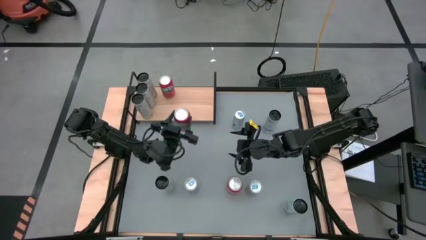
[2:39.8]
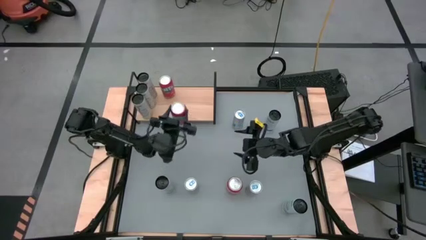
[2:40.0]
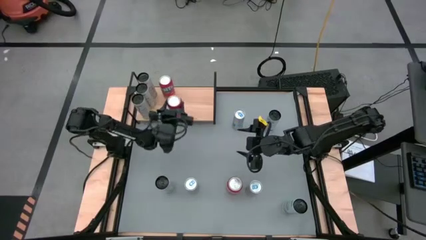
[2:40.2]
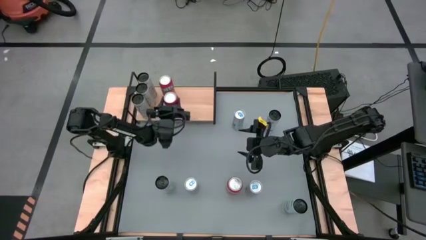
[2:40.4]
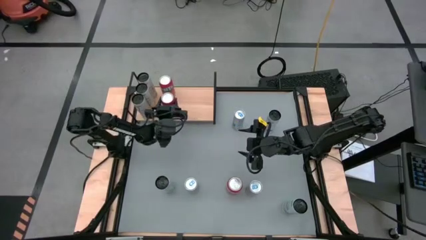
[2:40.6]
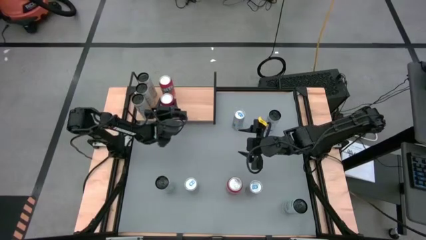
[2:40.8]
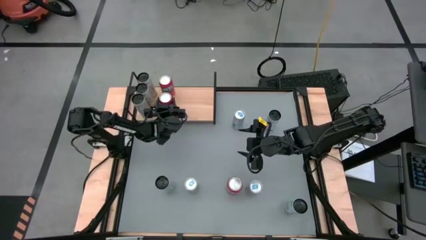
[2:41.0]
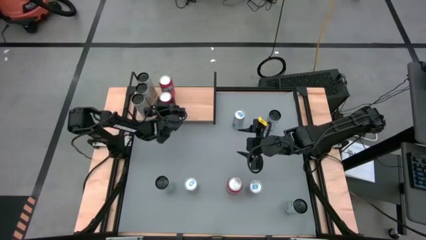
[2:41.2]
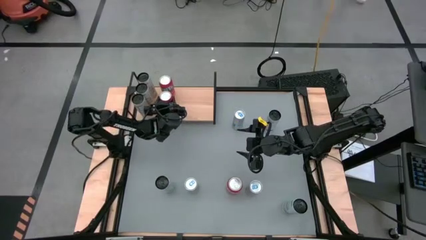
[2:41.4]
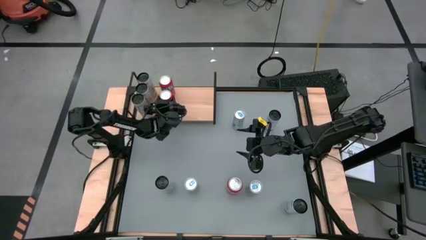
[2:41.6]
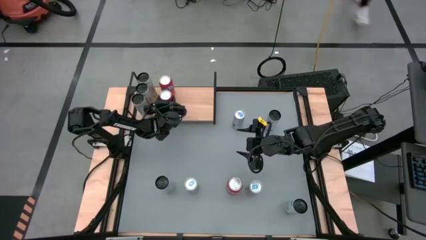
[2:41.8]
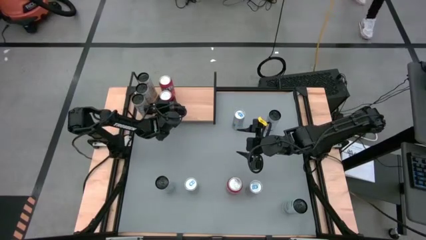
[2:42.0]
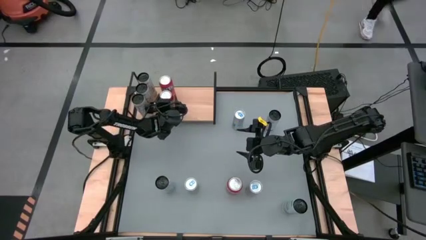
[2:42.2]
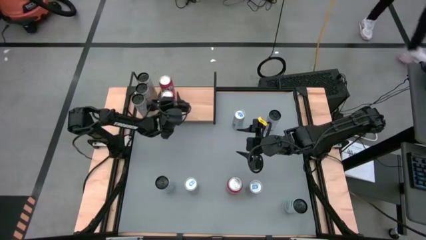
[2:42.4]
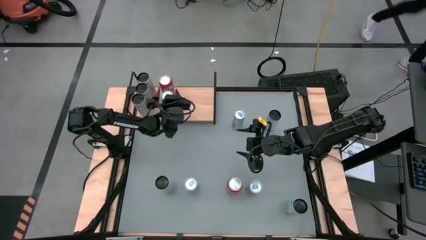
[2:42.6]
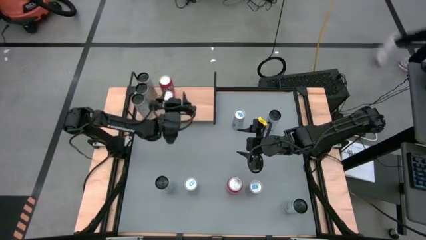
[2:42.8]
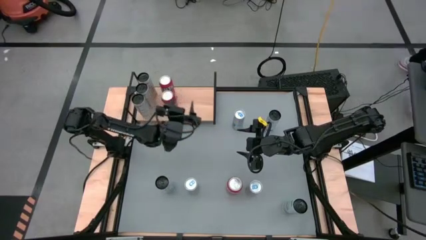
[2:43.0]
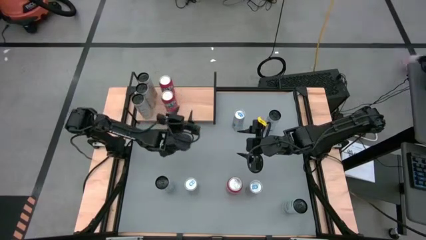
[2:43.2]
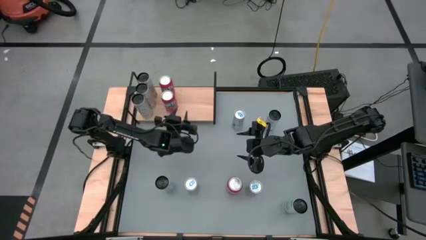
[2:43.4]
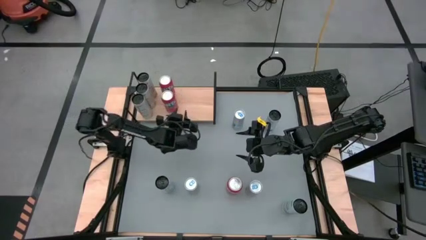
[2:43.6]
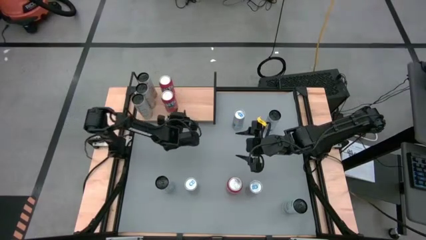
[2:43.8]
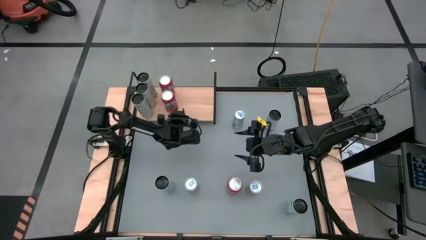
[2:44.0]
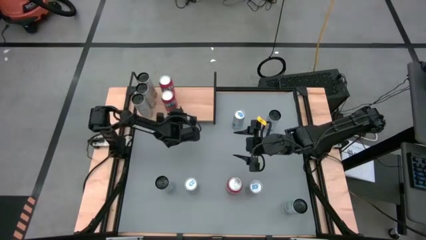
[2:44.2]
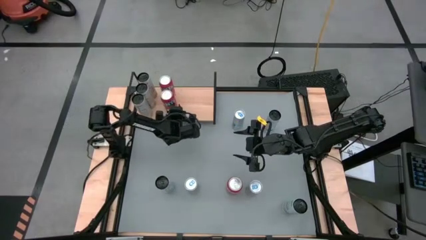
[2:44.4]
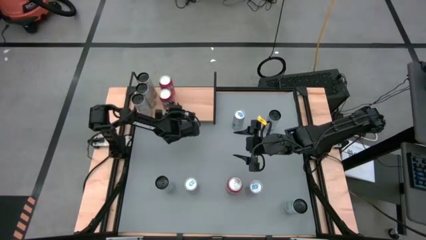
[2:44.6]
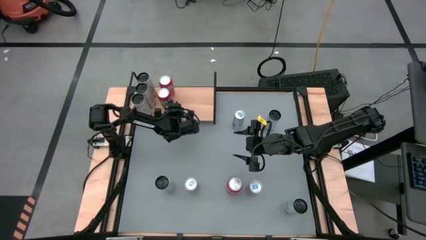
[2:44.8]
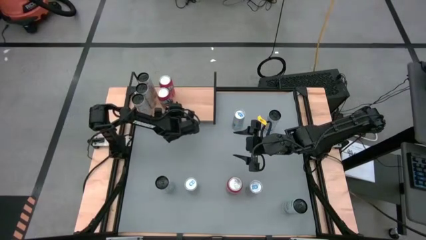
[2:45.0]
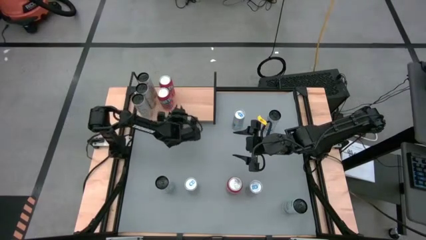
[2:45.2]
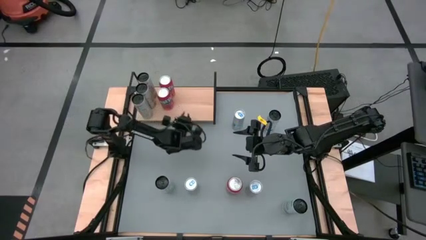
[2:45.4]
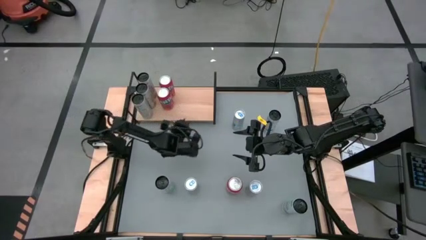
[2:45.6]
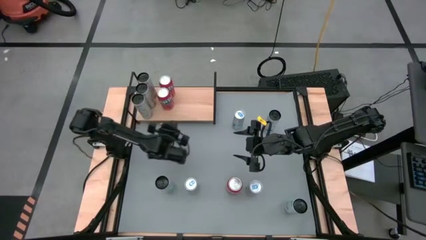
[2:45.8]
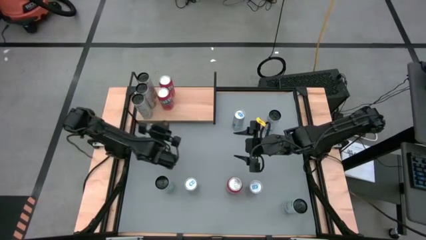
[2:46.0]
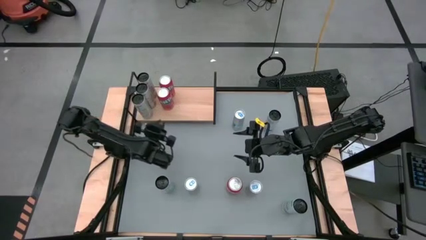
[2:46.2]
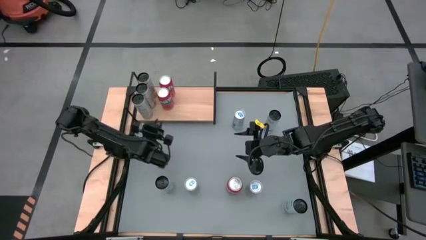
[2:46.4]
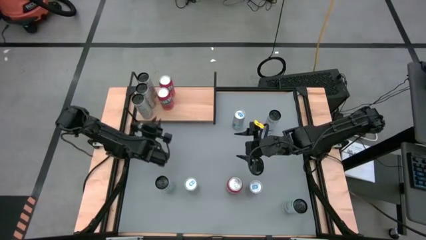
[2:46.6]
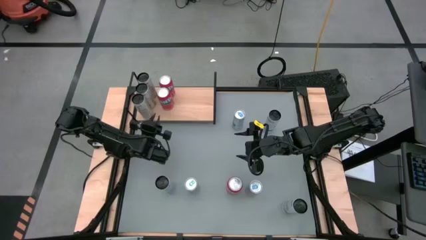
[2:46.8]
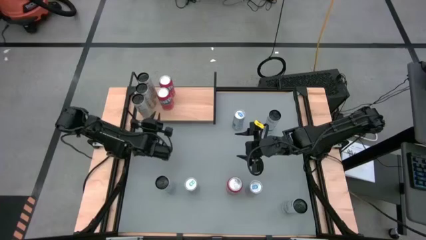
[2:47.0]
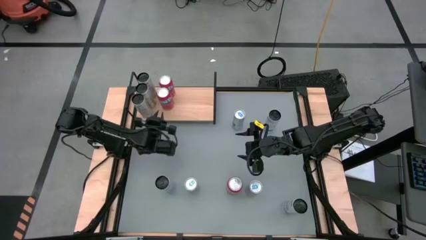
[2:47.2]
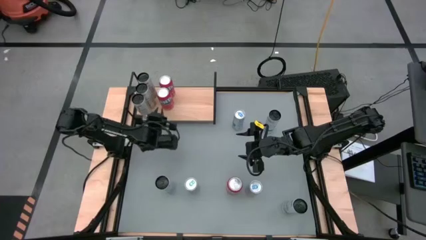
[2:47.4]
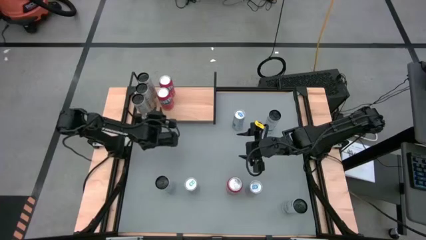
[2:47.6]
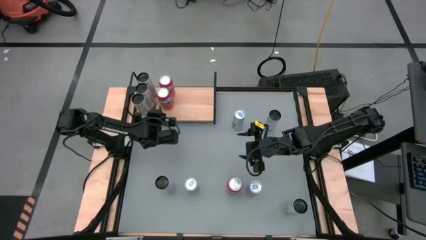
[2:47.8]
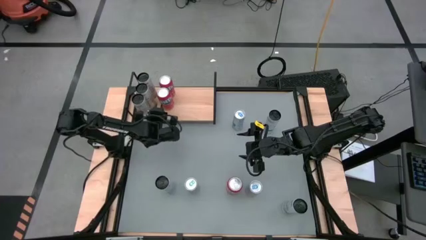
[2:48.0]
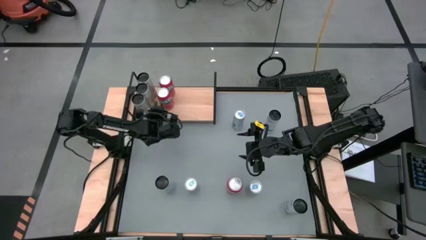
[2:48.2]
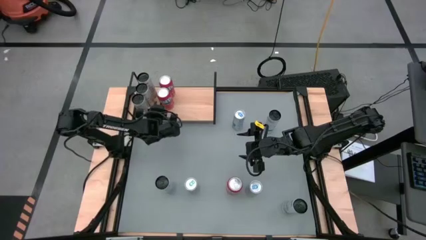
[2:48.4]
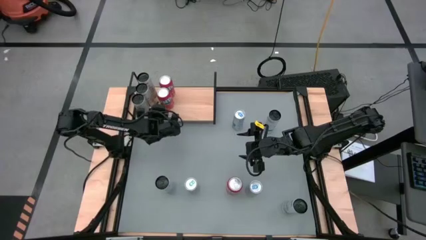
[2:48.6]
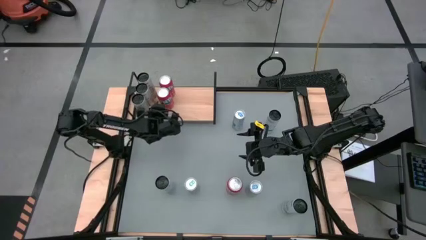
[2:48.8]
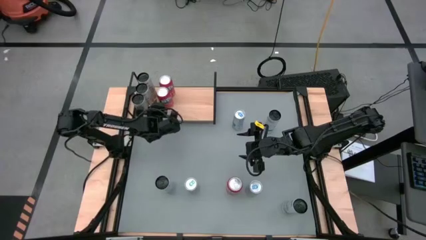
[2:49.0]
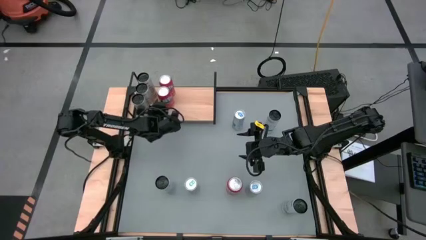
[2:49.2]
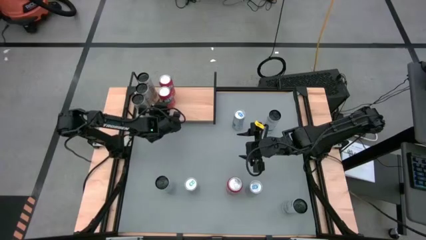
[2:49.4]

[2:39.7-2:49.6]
Task: Place canned beverage on shelf
Put the top red soda can on the shelf aligned with the other red soda can

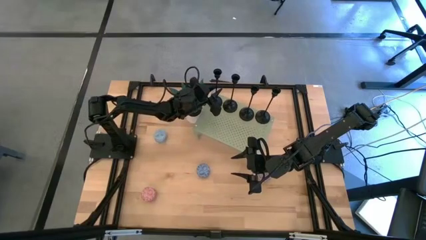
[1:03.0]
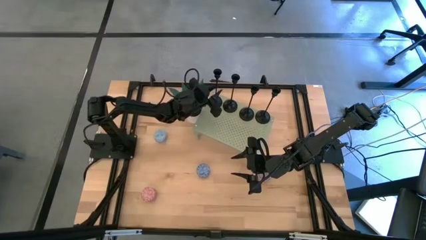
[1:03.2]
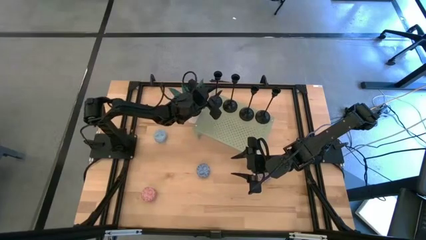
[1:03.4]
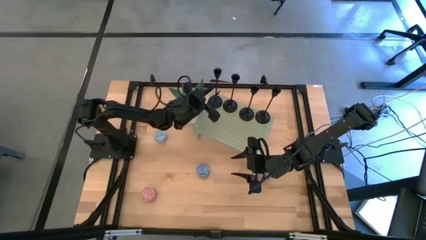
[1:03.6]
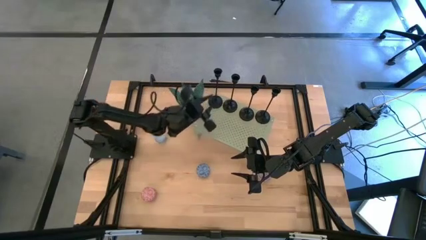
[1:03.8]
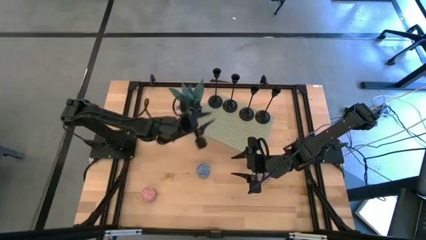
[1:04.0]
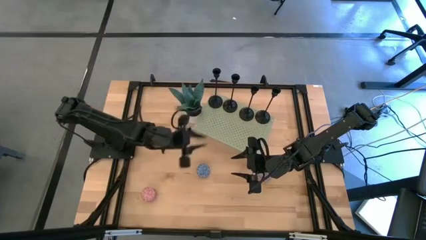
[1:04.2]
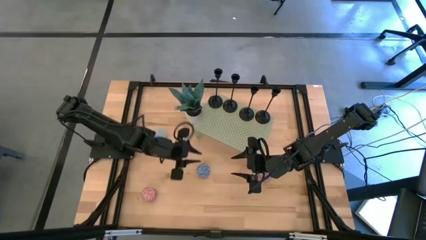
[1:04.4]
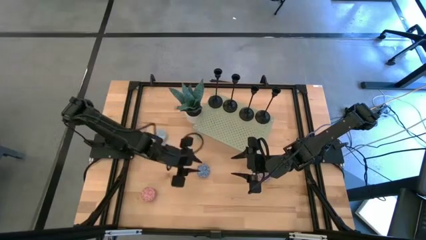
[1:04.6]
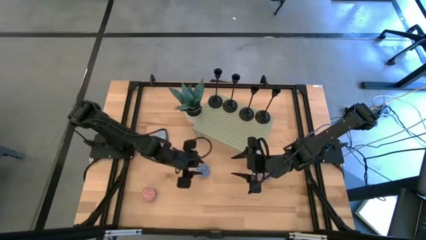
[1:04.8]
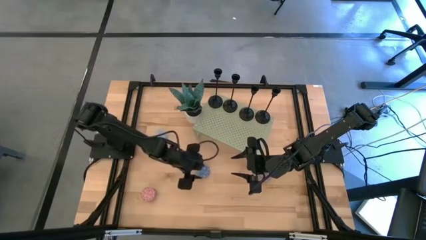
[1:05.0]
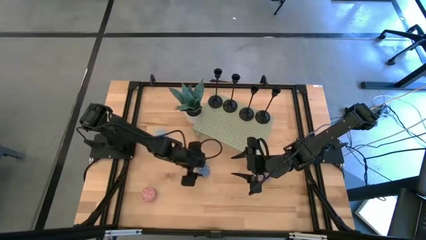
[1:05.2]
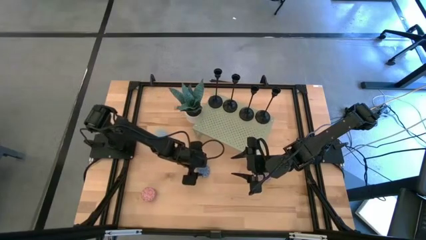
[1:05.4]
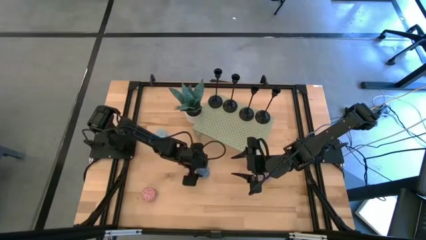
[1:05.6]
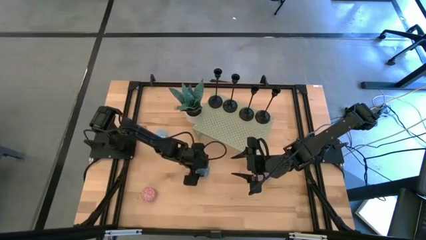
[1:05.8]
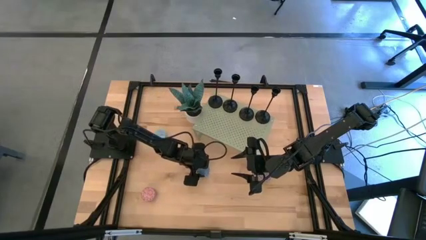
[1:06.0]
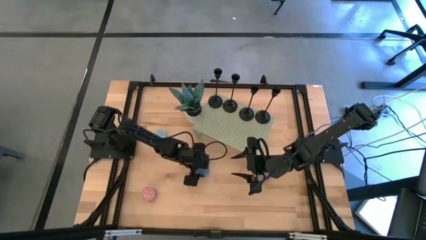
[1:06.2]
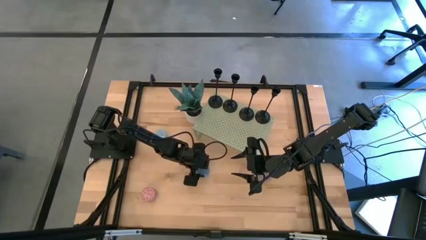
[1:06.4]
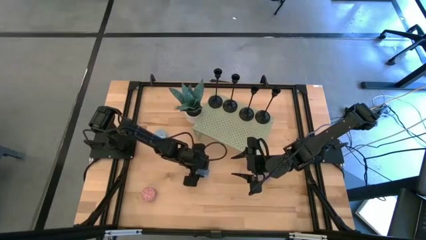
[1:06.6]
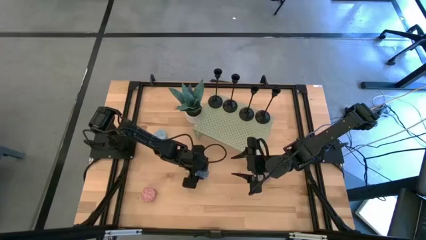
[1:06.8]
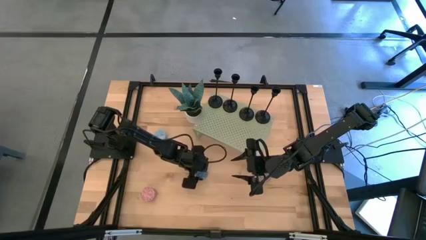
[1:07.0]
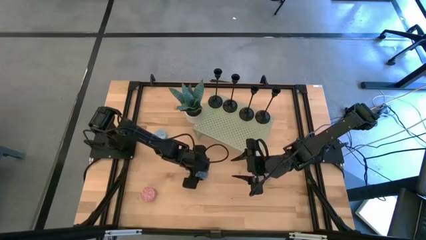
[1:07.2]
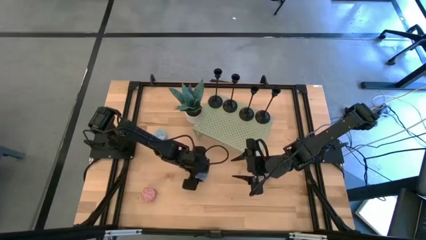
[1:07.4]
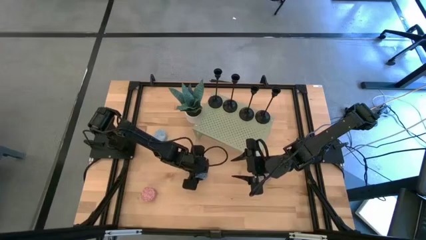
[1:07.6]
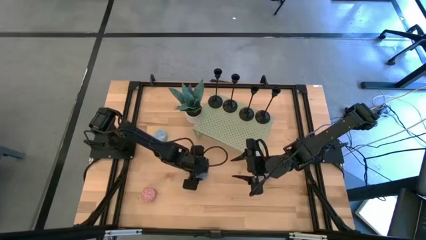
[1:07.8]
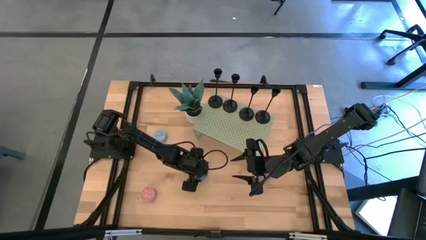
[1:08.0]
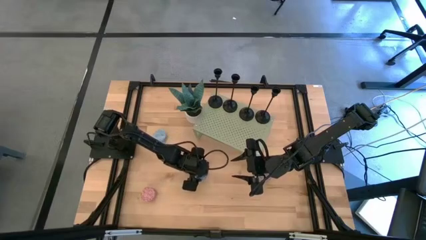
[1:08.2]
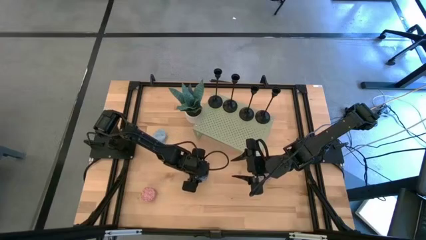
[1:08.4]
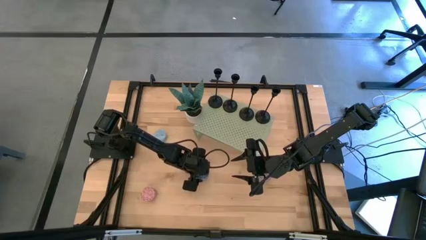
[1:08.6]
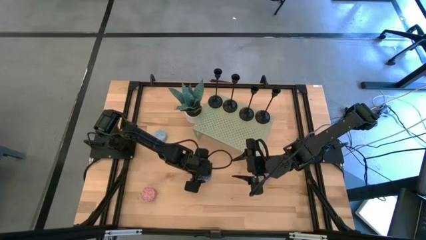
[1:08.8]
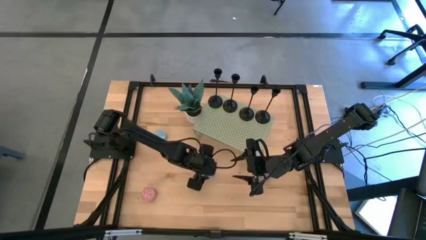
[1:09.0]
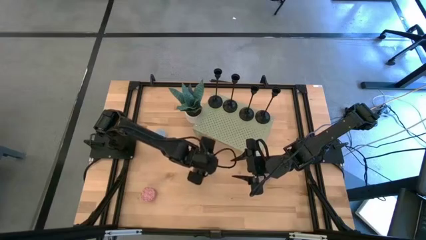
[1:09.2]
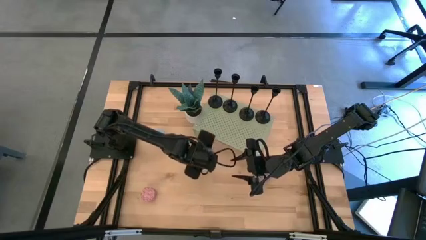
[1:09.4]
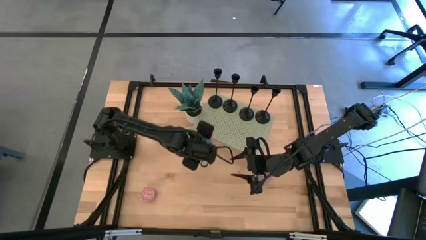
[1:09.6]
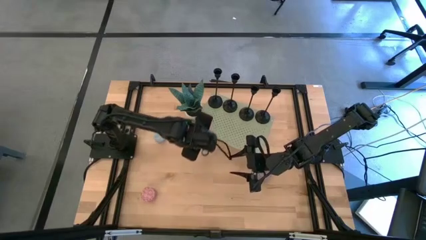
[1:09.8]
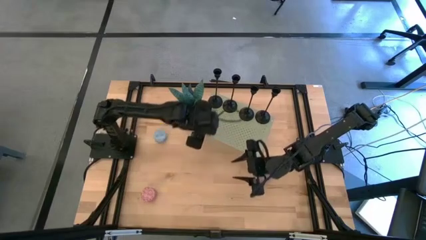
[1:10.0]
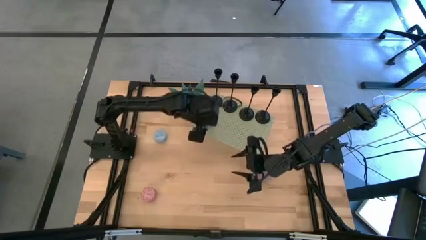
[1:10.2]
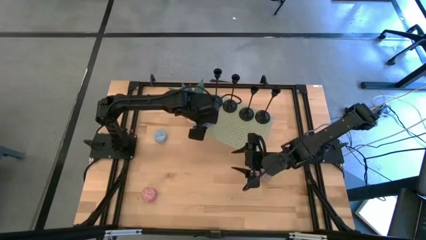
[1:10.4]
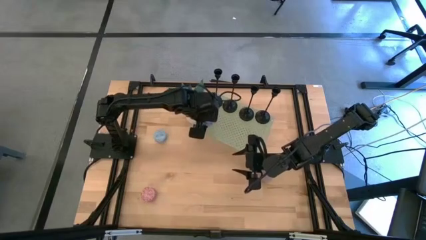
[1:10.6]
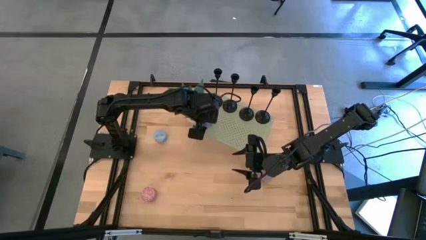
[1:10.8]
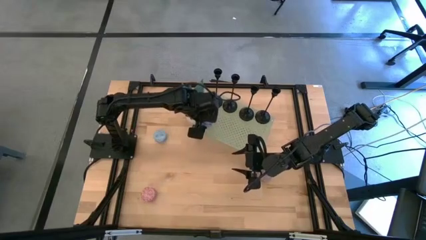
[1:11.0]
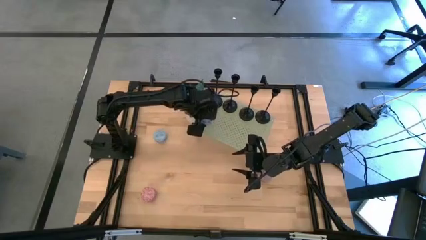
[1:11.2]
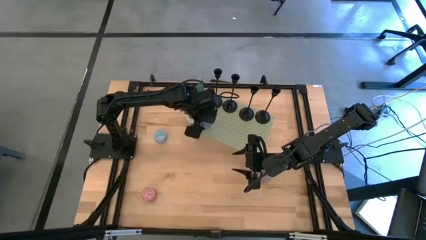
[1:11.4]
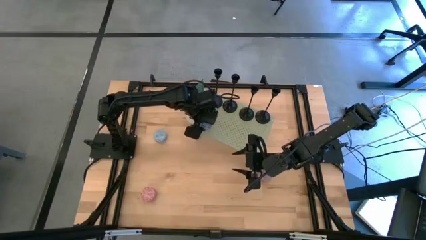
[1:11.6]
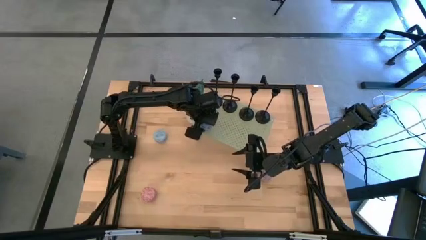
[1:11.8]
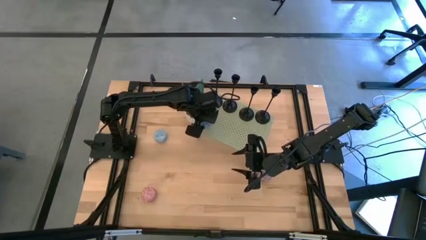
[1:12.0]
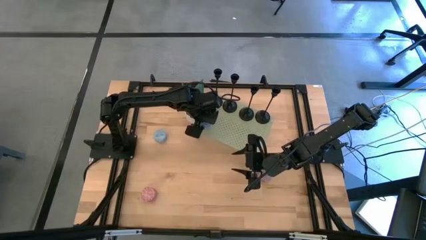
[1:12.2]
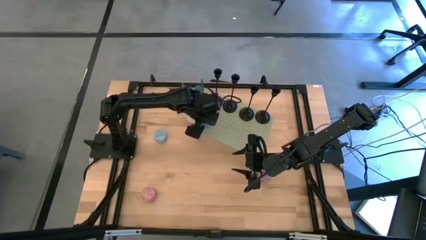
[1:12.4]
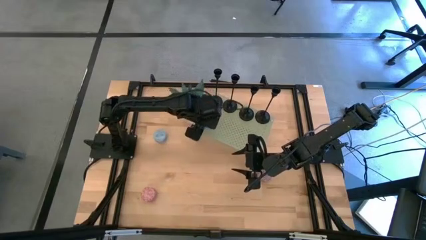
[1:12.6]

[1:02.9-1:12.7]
Task: Stock candles and holders on shelf
Put the blue scented candle on the shelf
